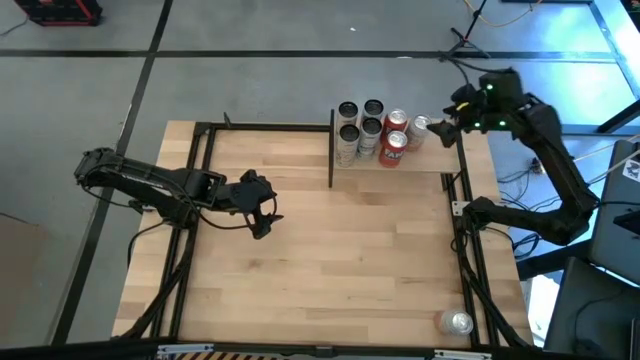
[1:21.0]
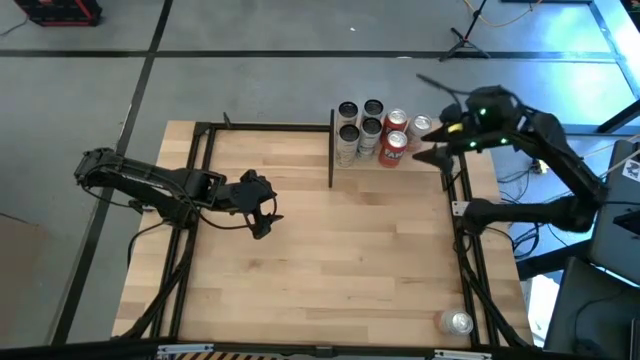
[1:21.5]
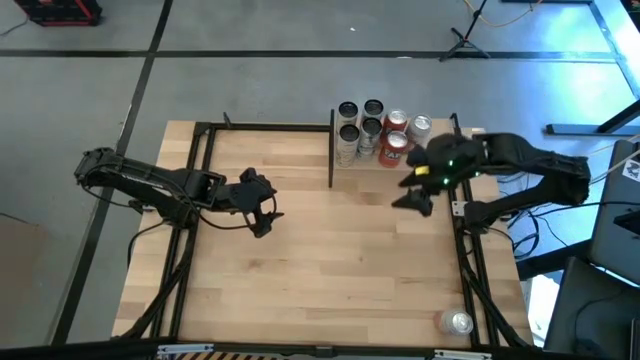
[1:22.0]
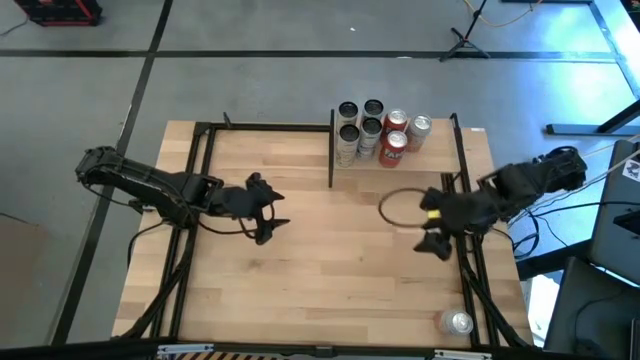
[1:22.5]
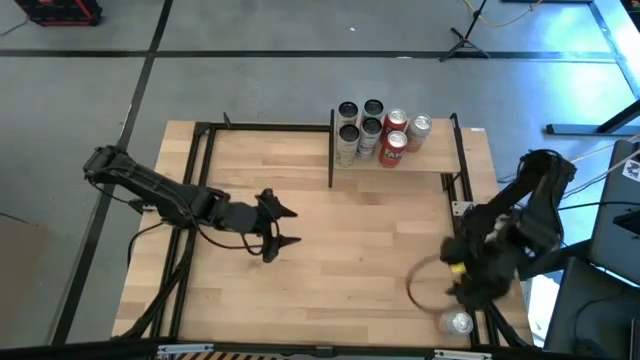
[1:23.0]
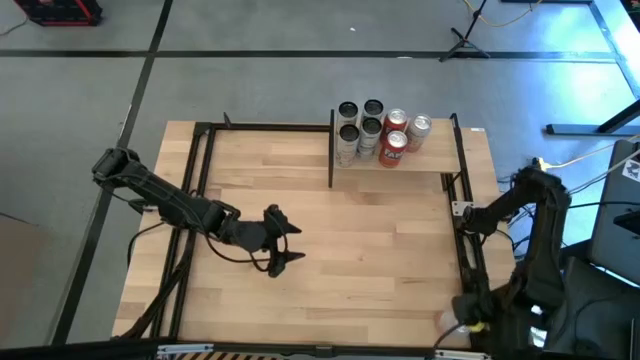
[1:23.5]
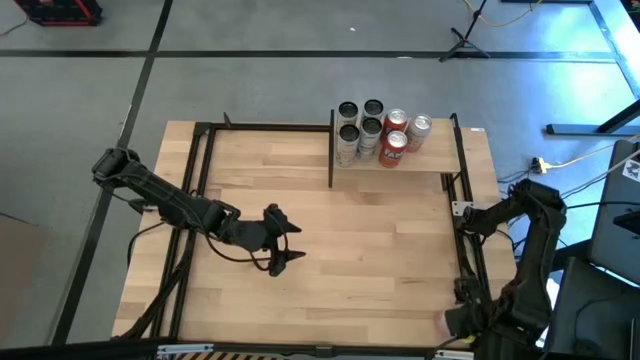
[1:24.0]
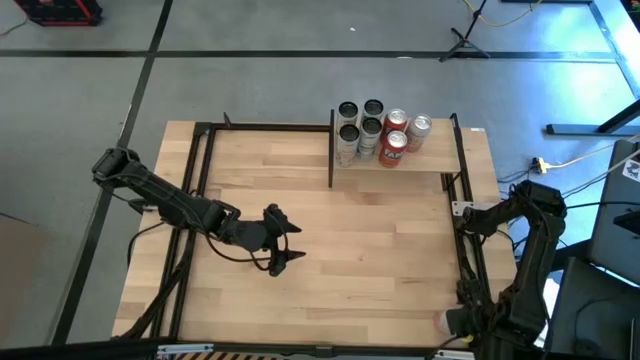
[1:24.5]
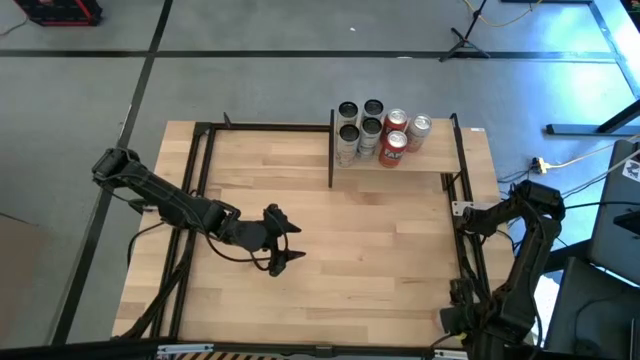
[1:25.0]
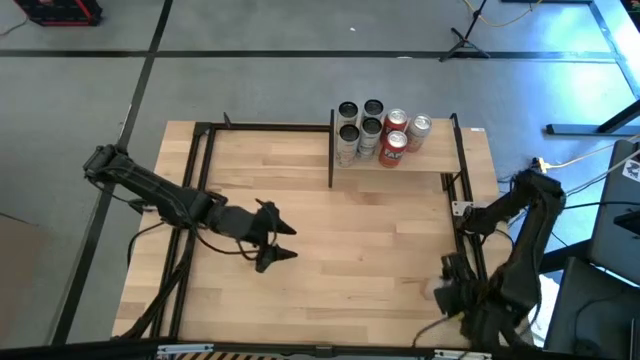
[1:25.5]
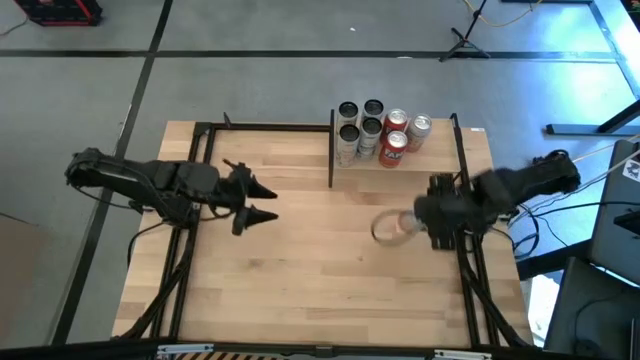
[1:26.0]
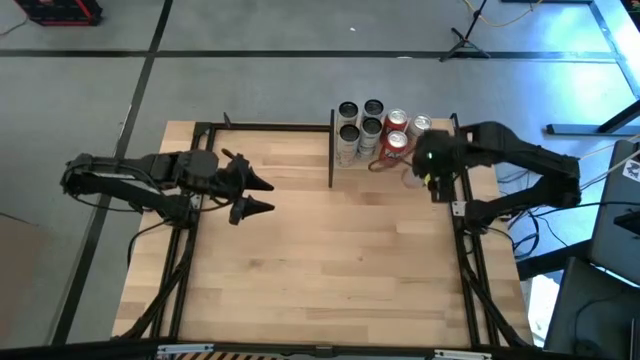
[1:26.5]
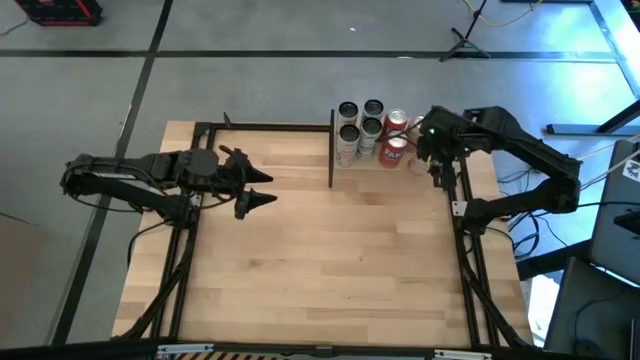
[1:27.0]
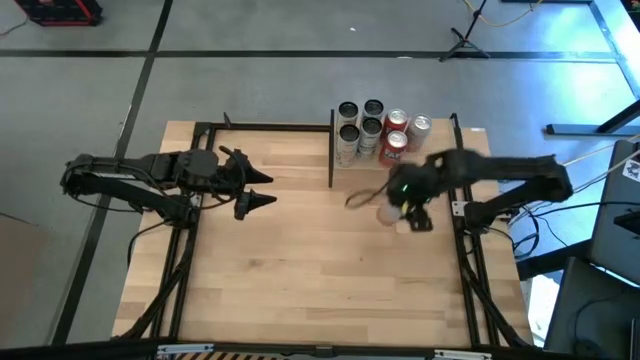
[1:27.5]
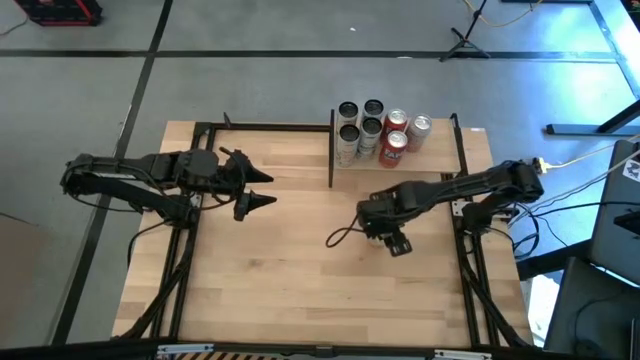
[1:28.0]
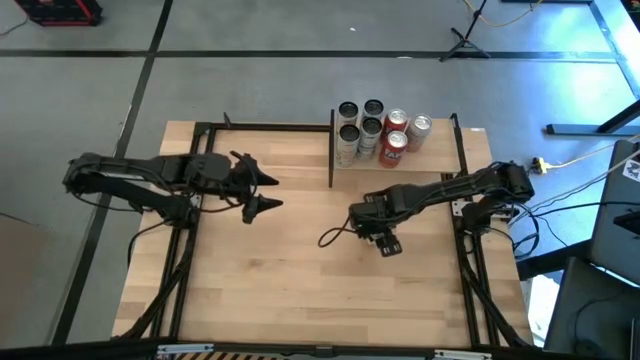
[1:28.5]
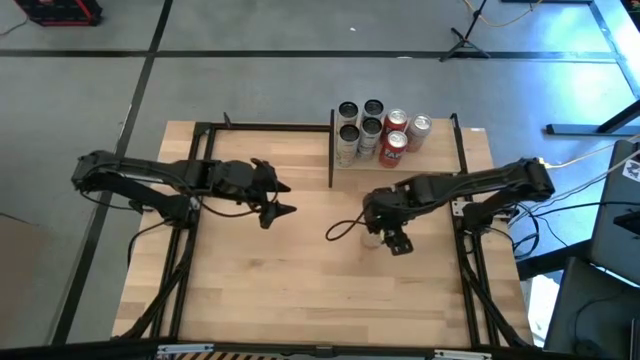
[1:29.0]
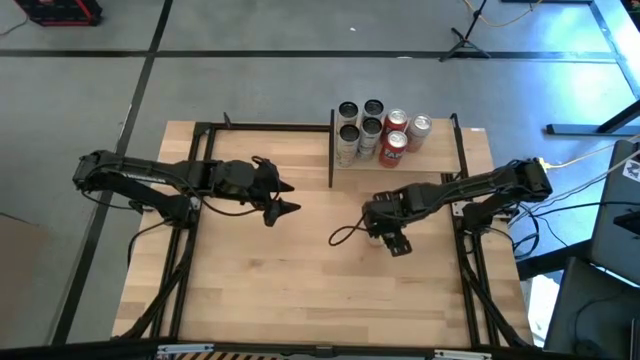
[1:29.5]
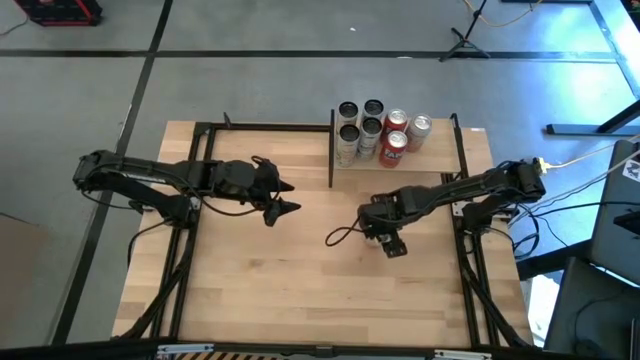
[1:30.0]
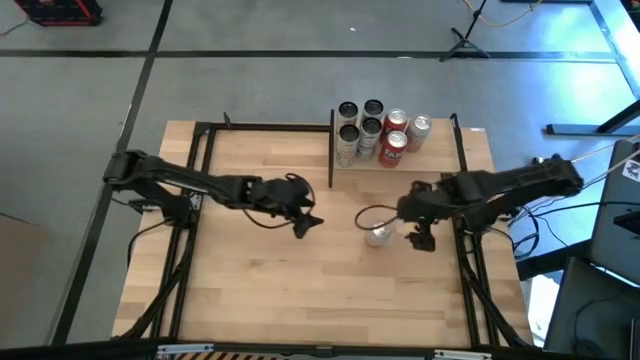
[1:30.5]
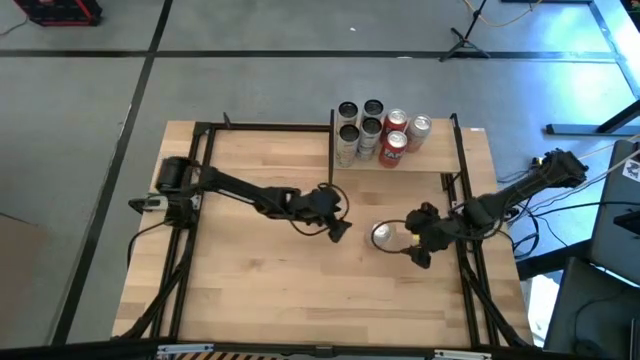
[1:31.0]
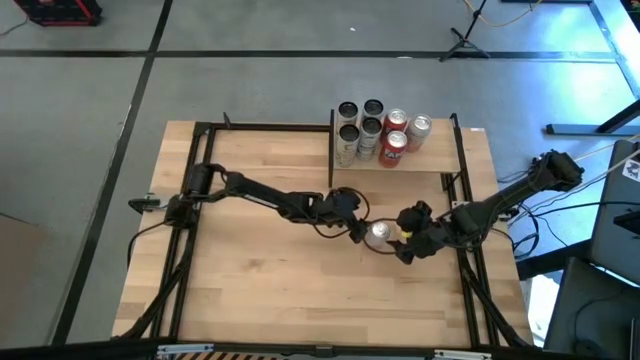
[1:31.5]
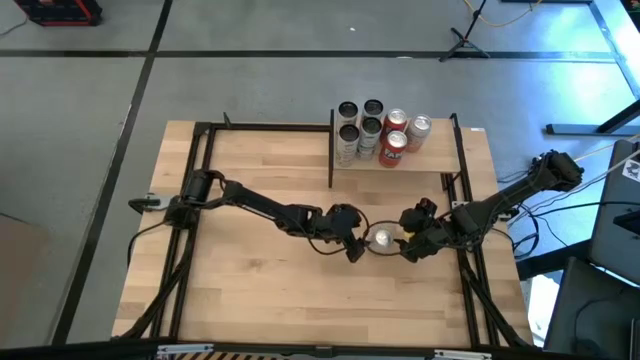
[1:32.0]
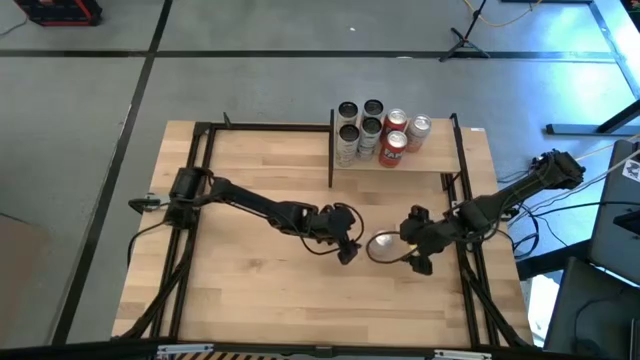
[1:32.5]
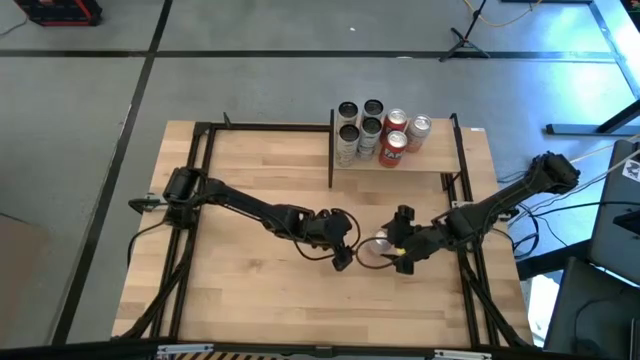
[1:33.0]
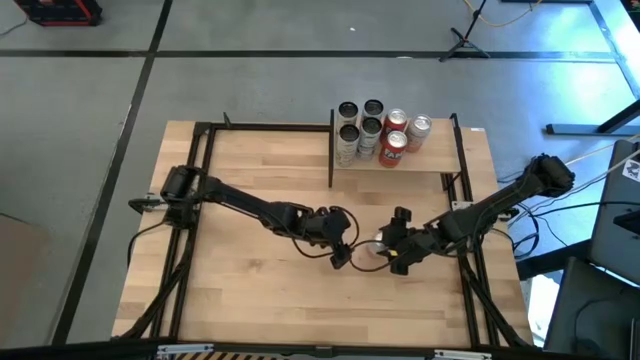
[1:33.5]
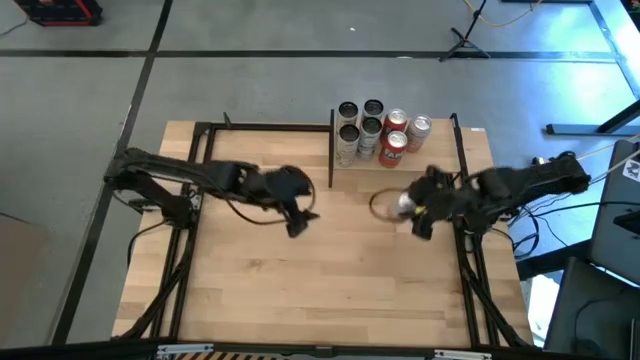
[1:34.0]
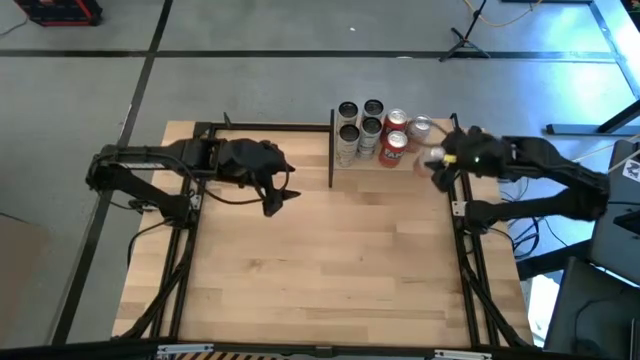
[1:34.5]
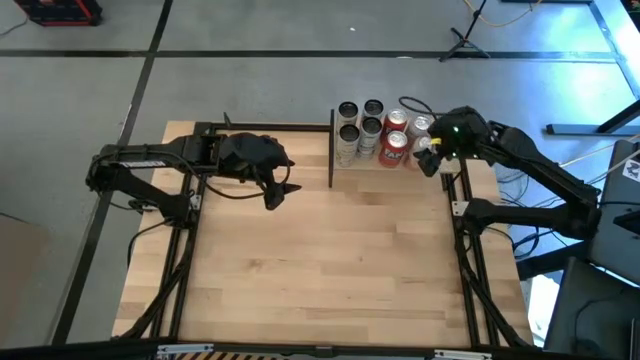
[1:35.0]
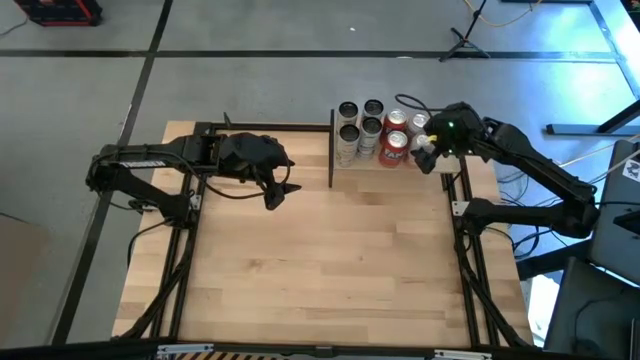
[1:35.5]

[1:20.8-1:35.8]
Task: Place canned beverage on shelf
Put the orange white soda can on the shelf aligned with the other orange white soda can

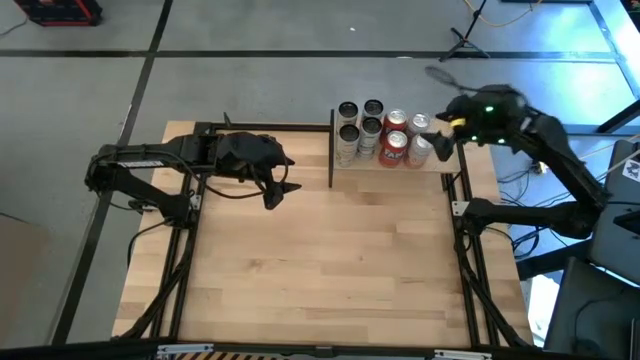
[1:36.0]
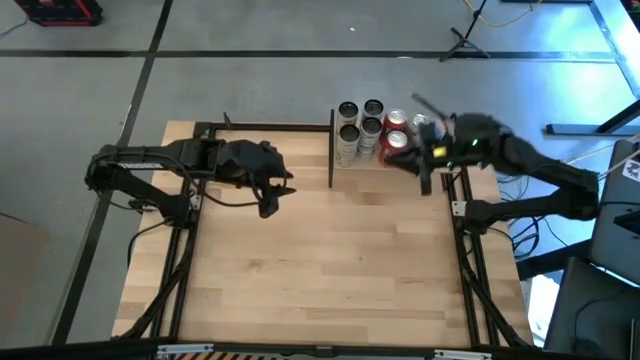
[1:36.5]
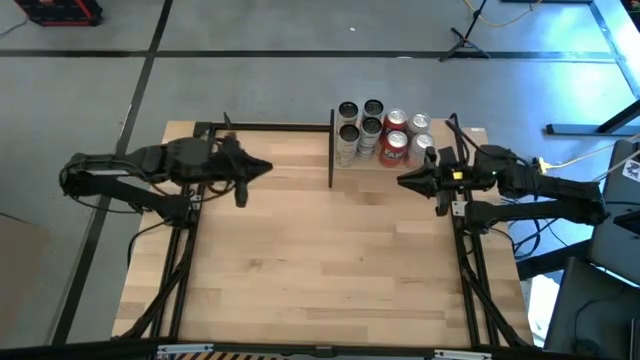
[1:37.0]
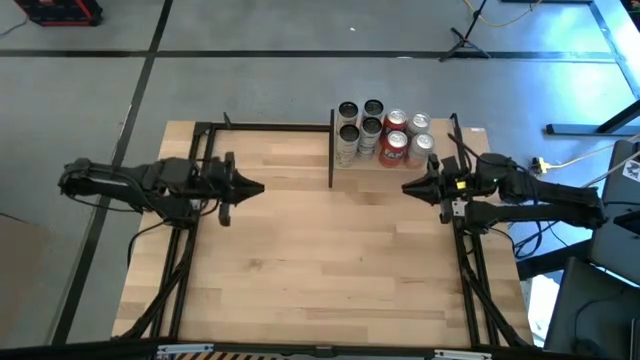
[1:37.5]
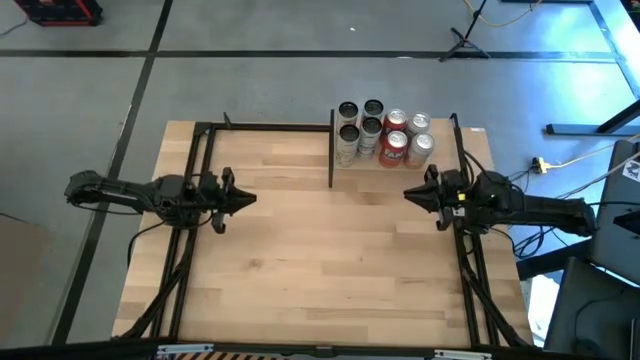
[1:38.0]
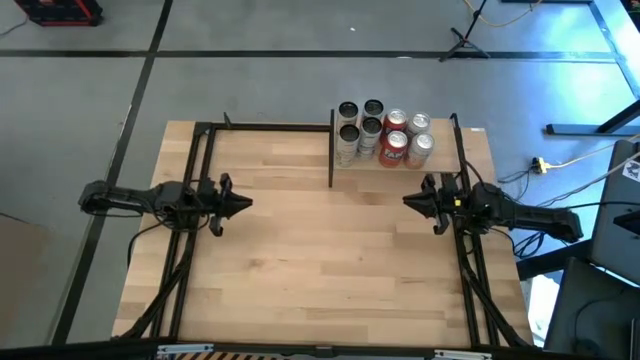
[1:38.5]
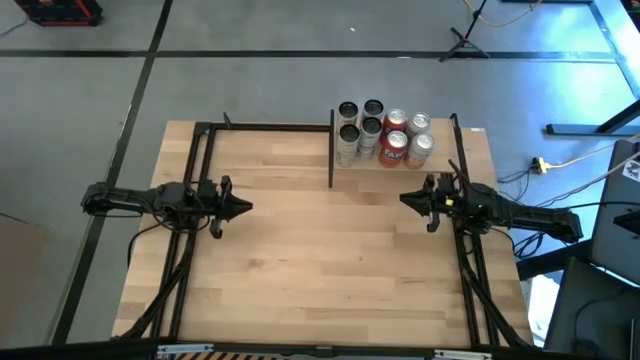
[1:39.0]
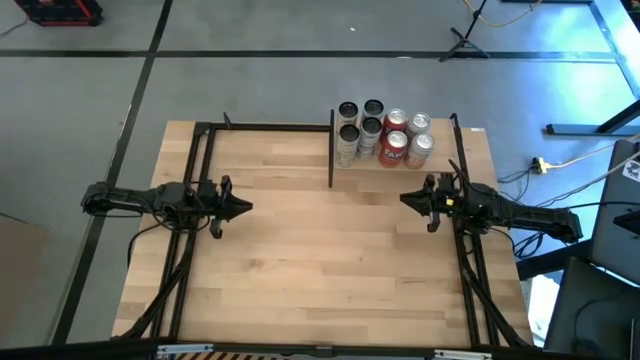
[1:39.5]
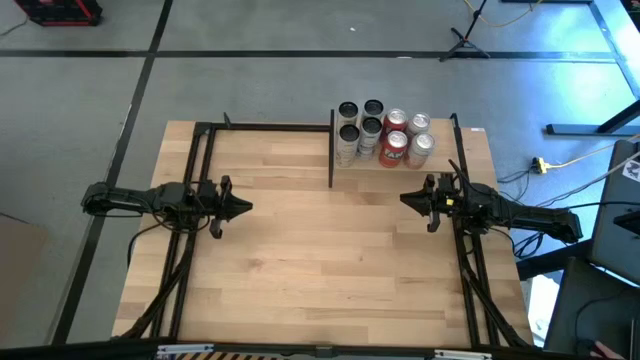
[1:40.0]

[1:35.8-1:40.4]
Return to Home Position

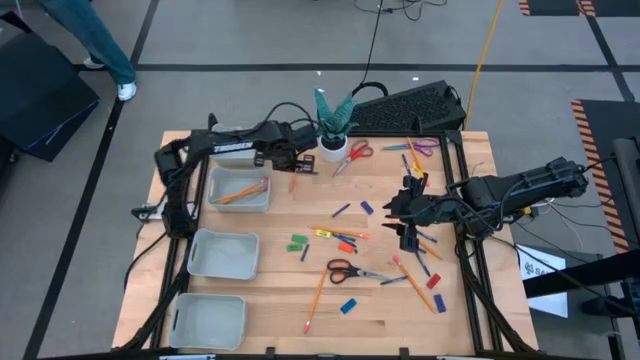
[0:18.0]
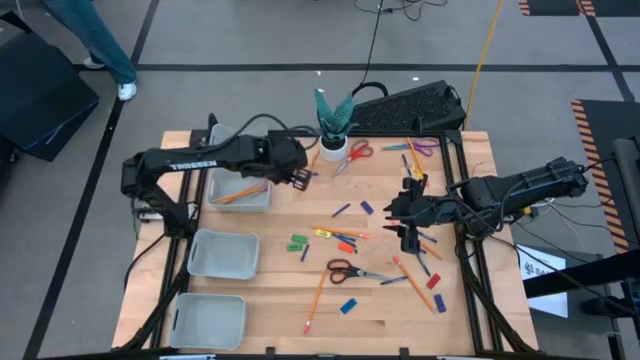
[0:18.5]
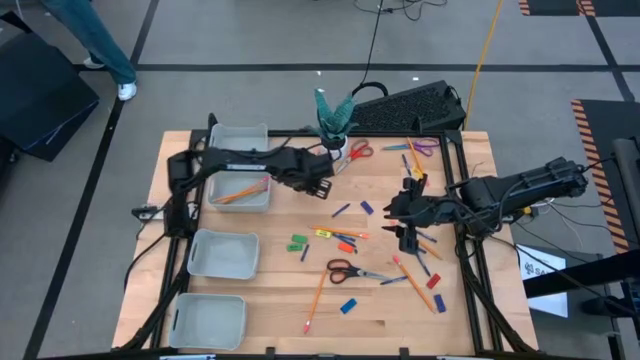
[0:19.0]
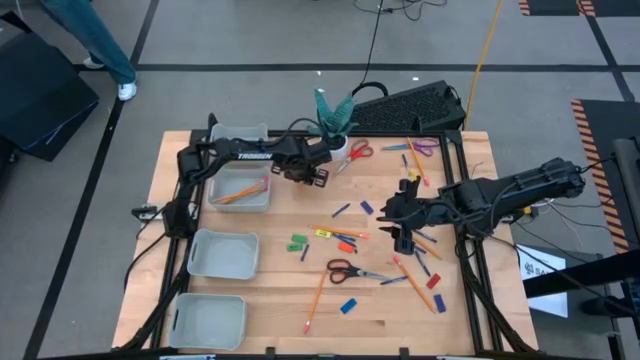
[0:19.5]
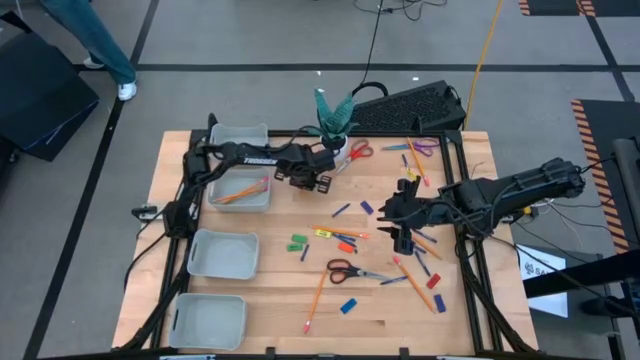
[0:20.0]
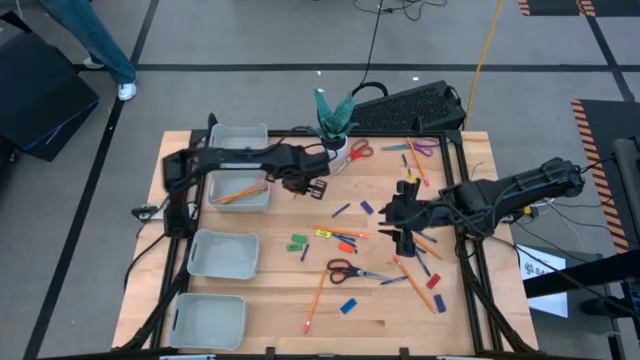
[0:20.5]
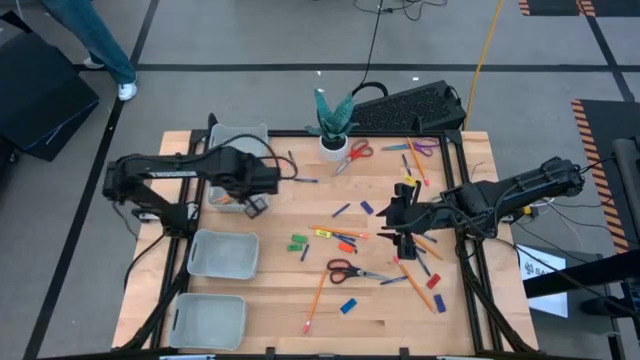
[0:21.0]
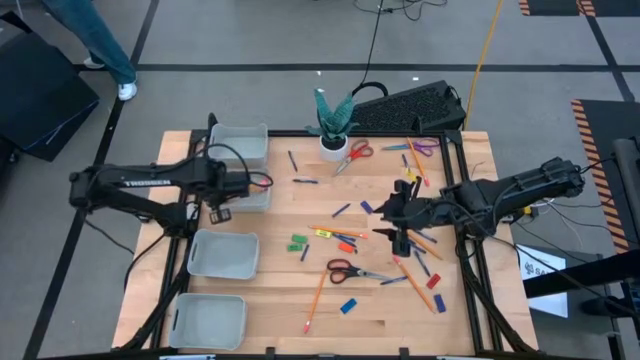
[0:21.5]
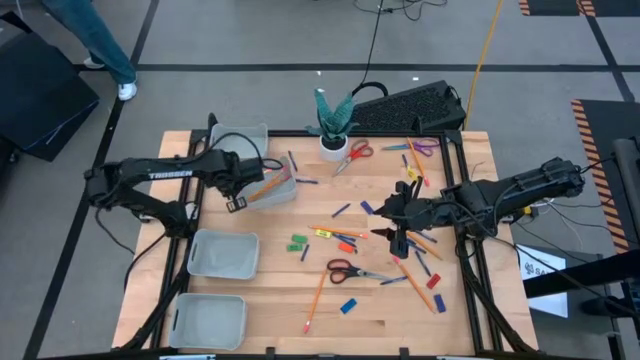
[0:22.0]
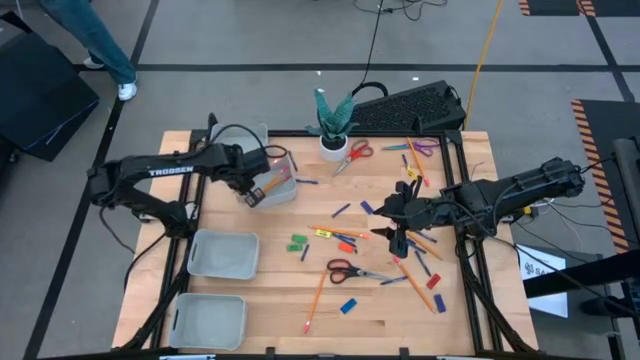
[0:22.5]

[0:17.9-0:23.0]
Task: Sort crayons/erasers/pens/pencils in bins
Put the orange pencil into the middle top gray bin
